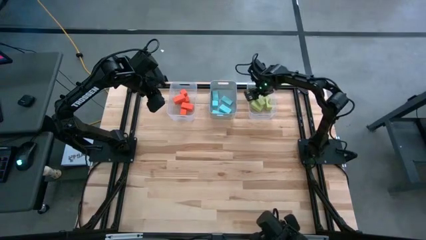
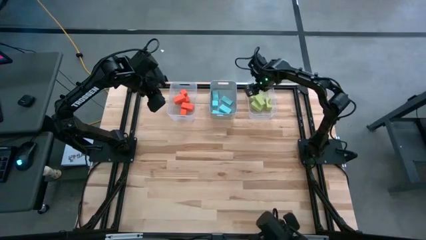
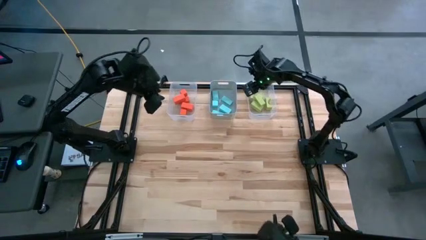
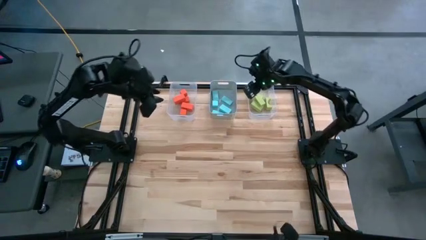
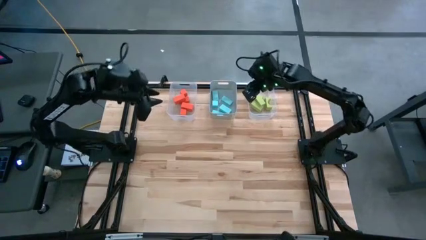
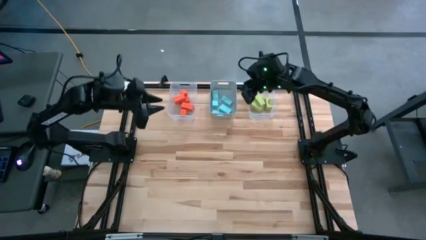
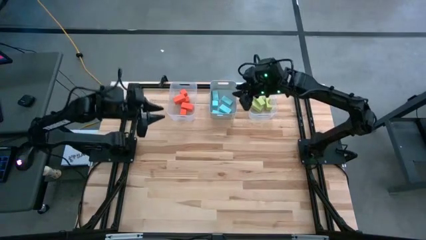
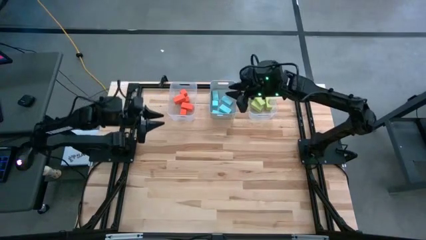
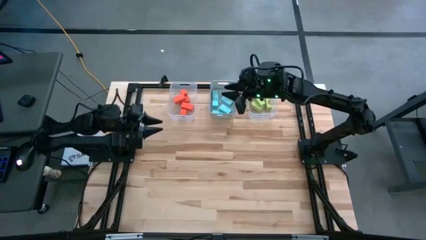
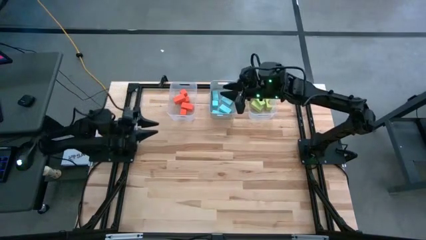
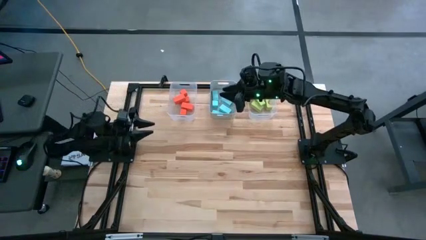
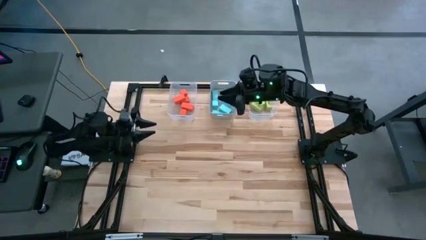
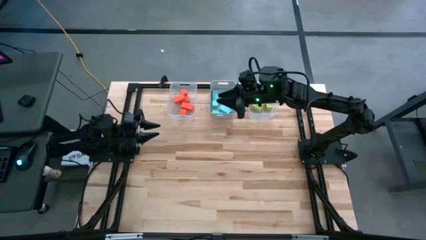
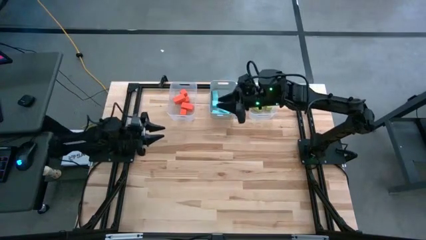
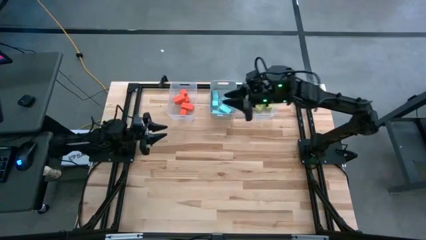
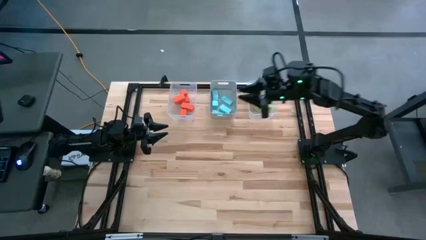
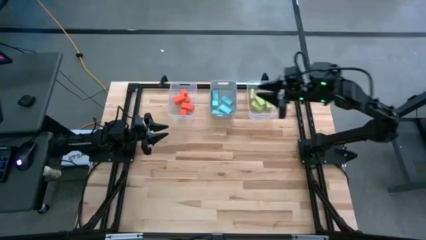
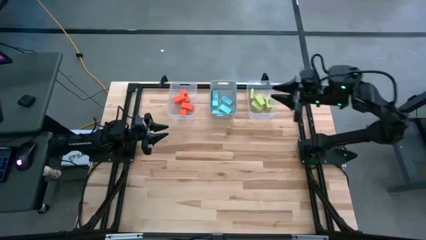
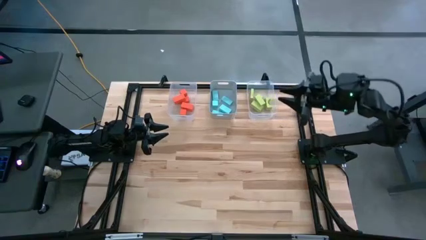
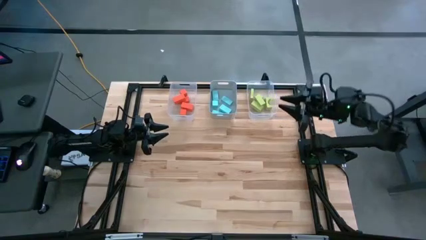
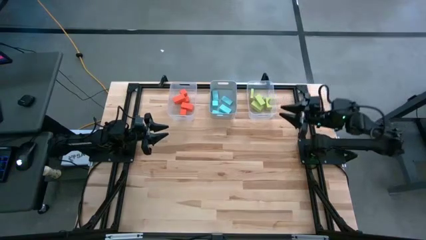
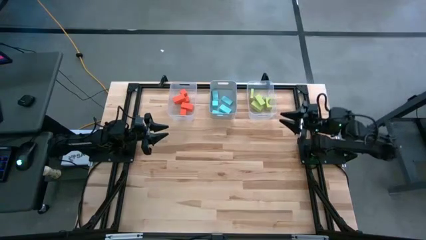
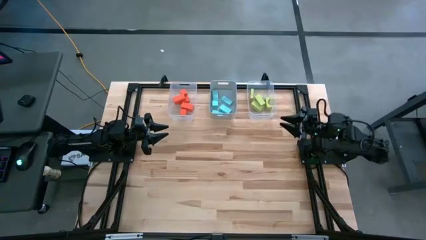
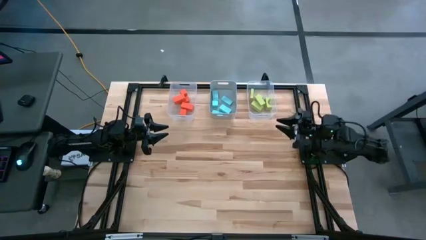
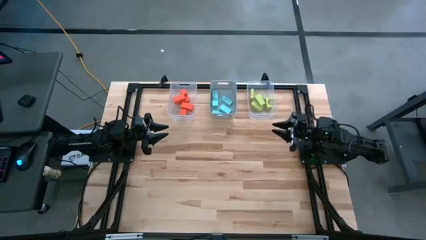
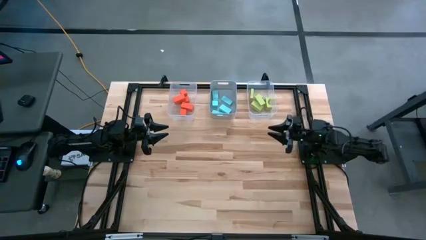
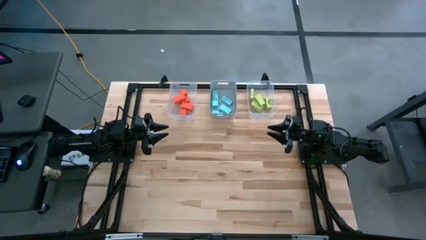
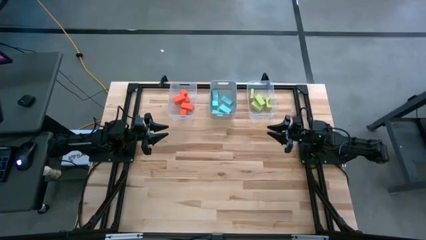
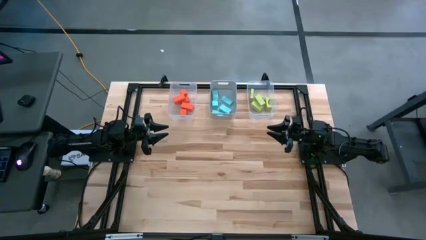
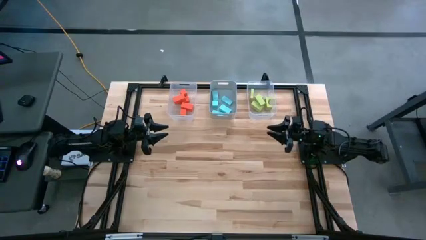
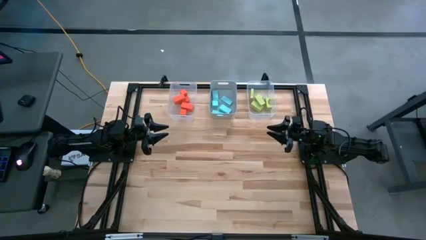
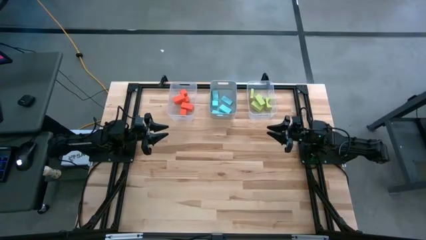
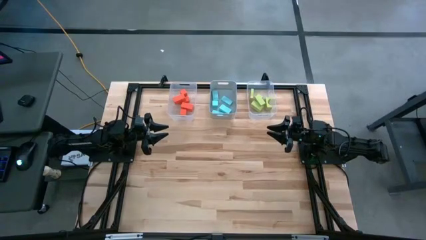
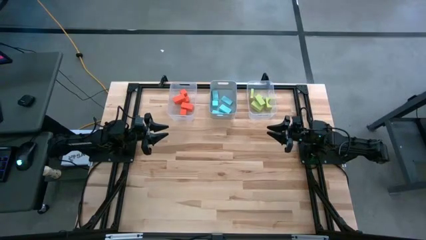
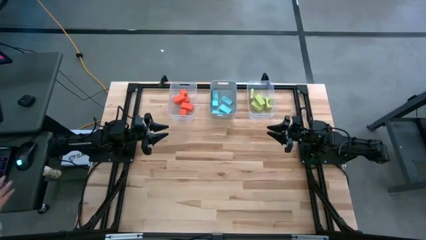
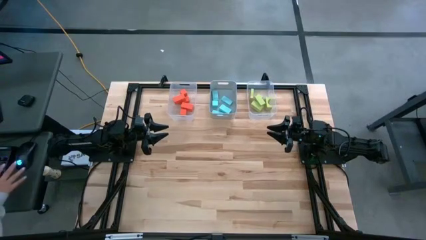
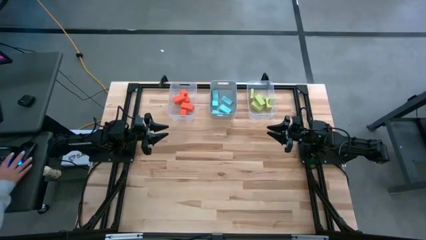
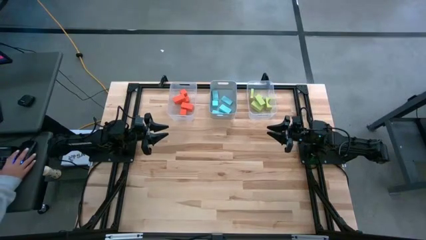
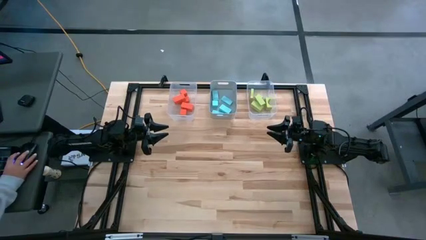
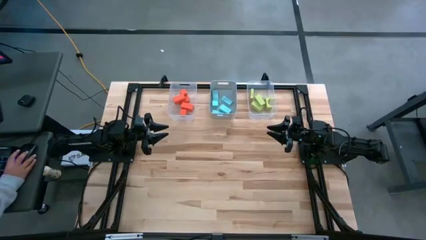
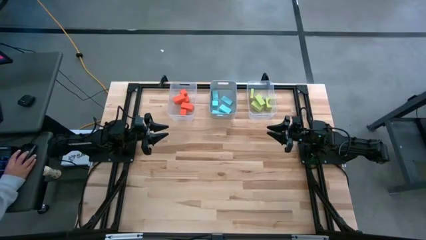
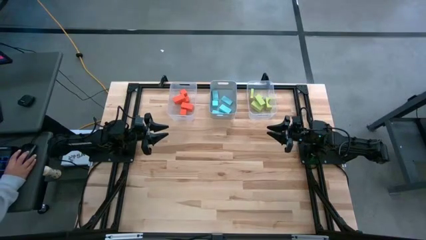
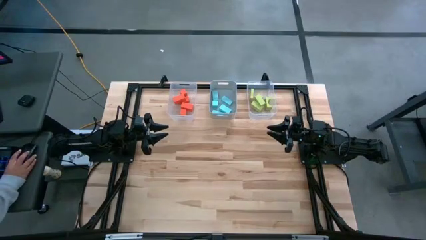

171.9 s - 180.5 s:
Task: Sort & place blocks by color
Return to Home Position

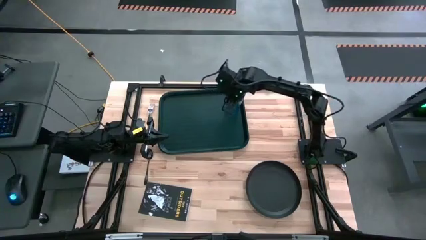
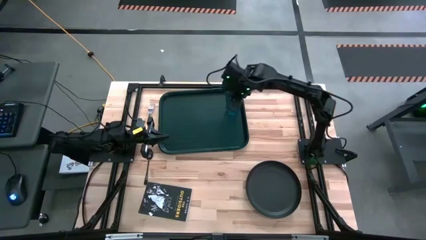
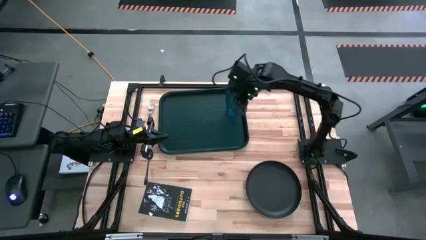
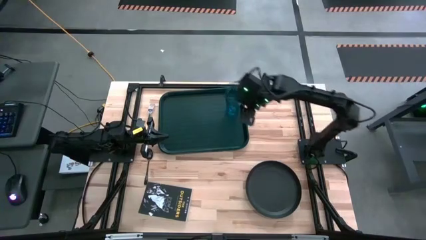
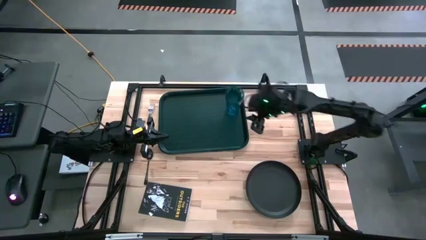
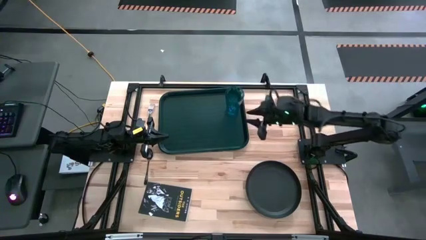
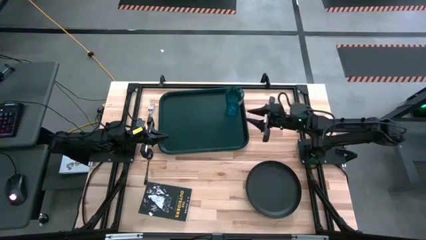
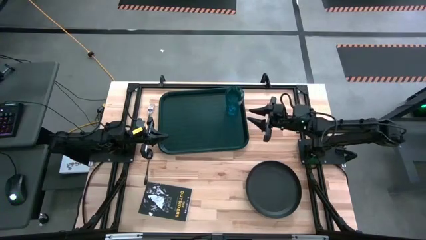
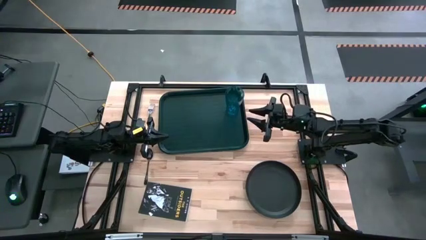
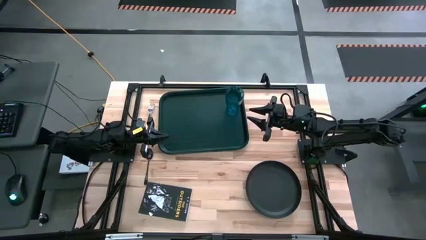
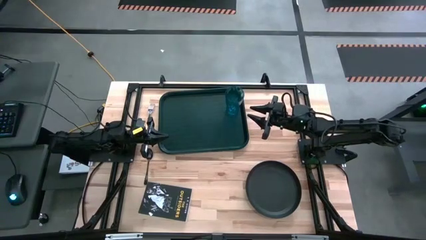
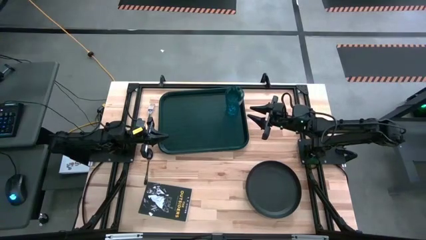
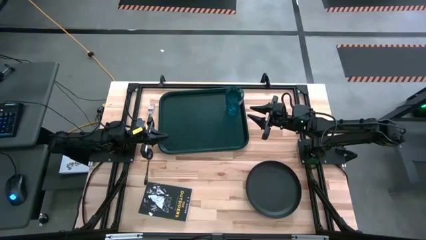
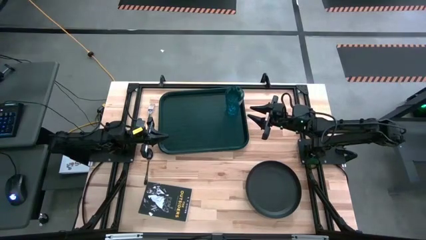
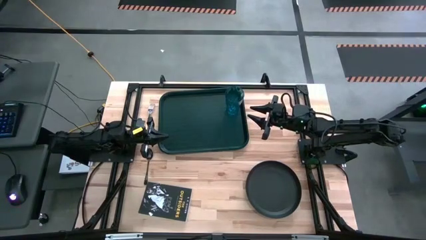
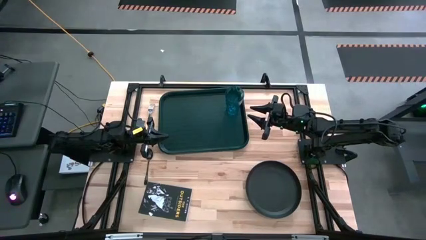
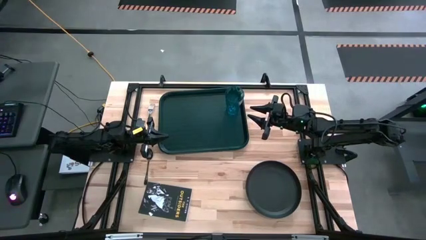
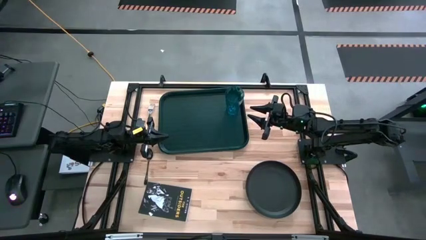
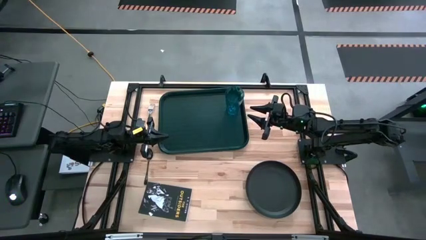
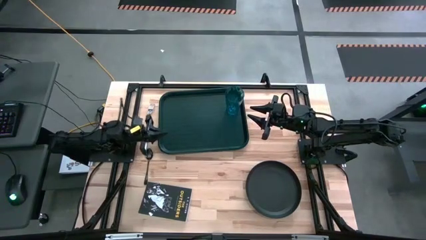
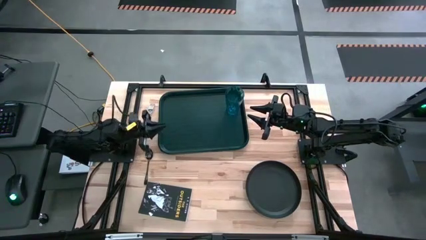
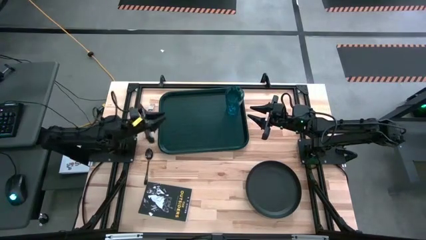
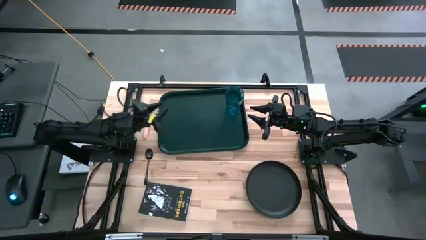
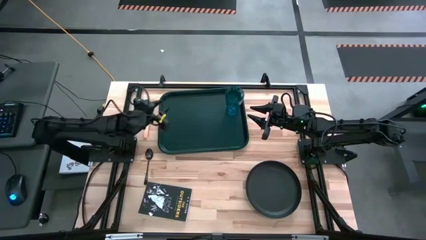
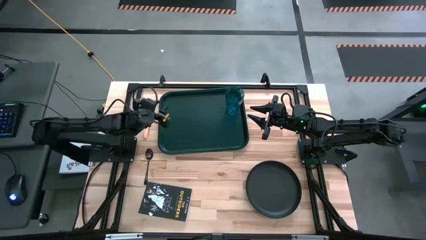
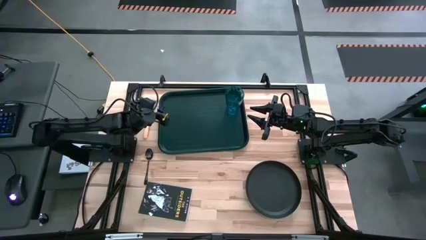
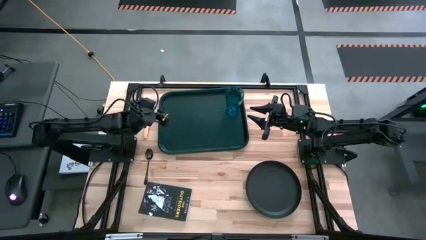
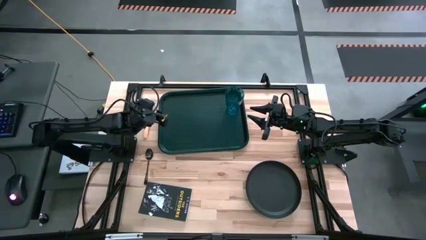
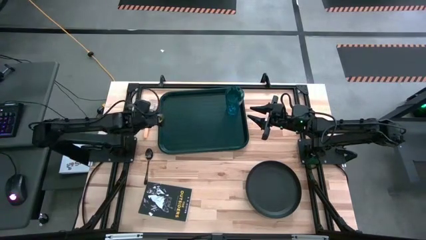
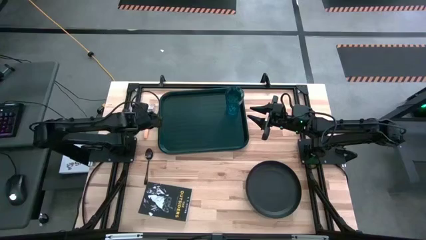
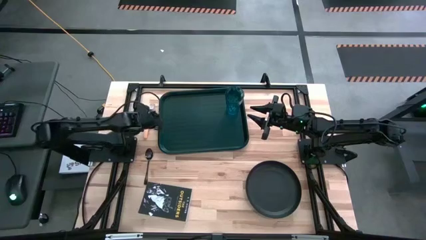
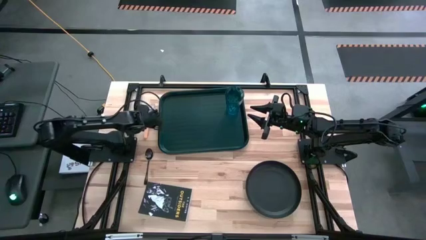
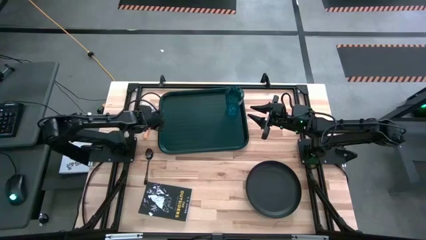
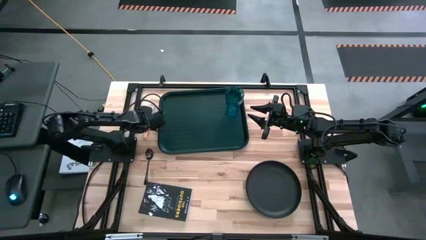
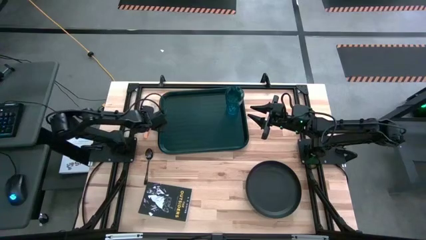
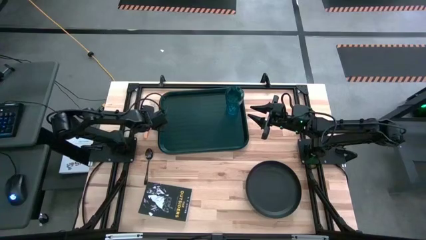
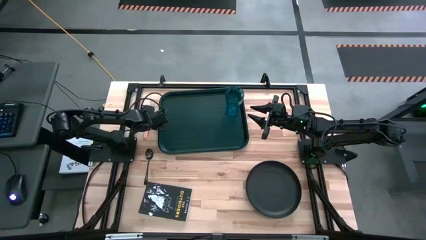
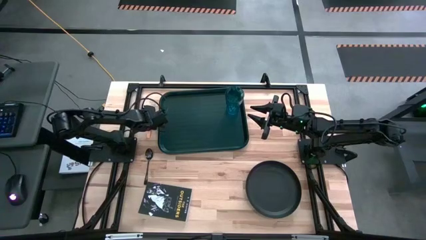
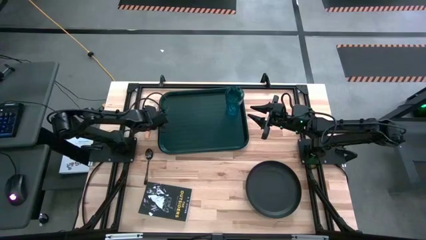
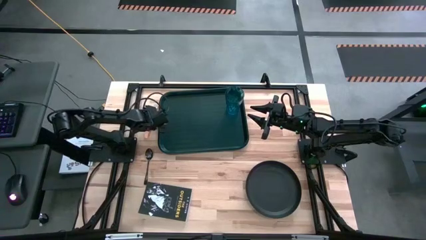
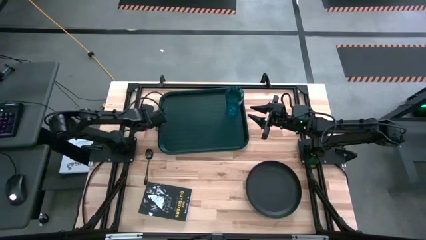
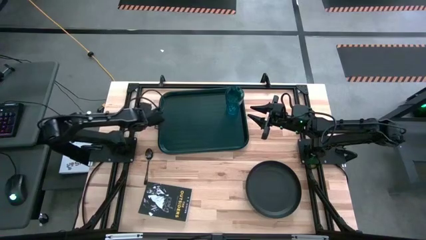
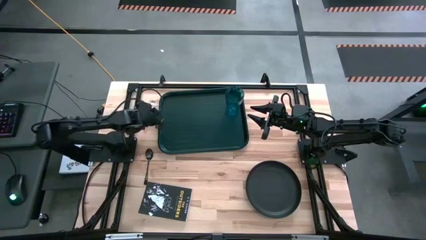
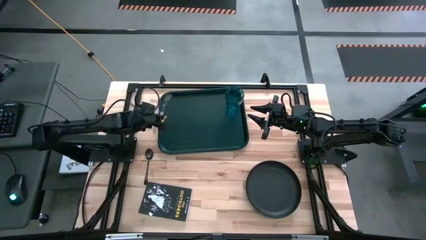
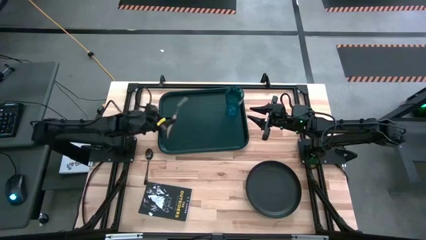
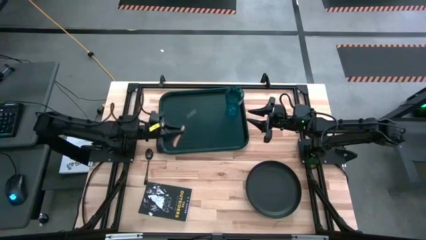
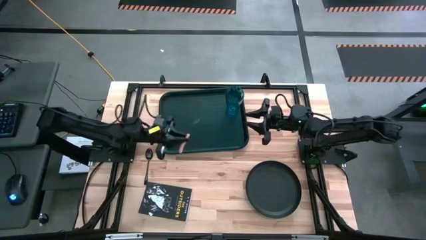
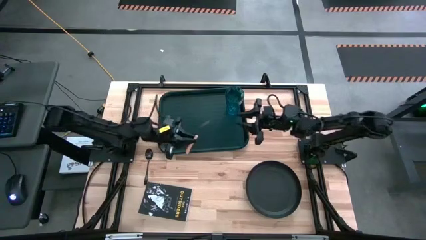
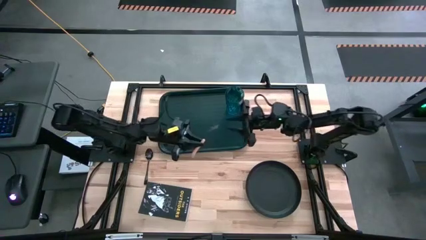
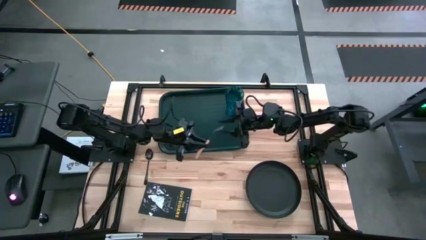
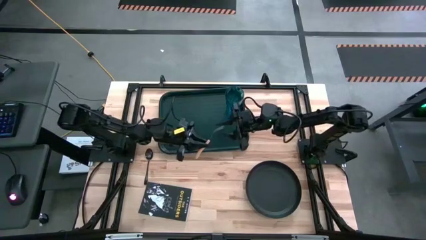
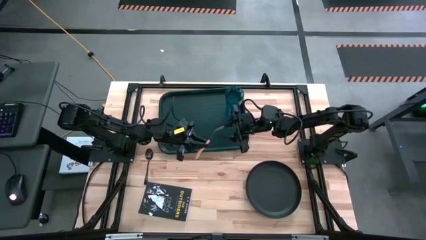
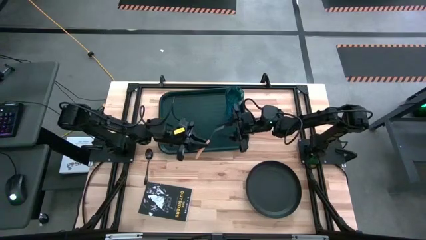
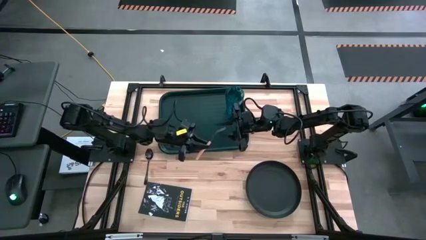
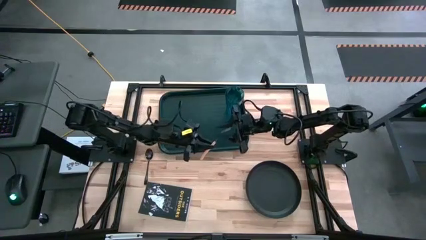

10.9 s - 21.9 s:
Task: Pick and place plate/cup/fork/spoon on tray
Put the orange fork on the left side of the black tray
